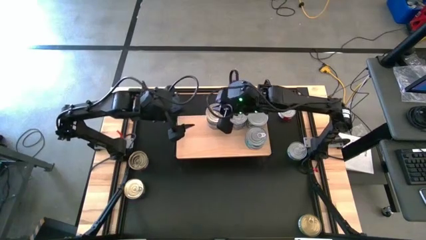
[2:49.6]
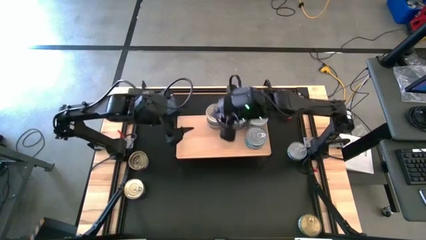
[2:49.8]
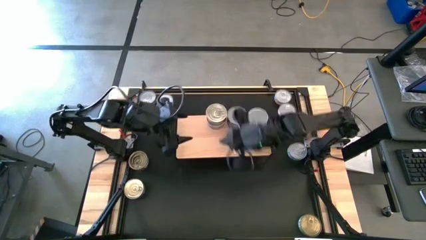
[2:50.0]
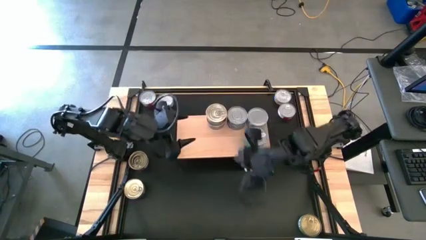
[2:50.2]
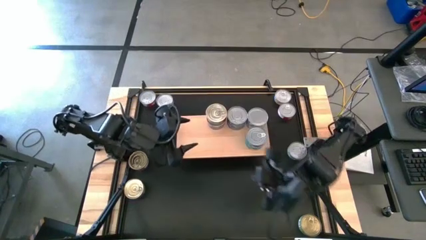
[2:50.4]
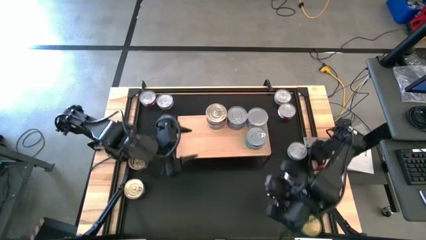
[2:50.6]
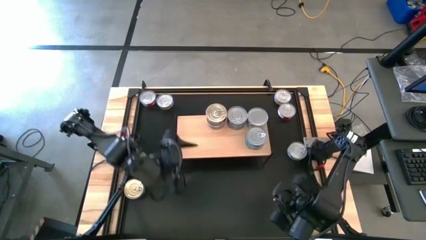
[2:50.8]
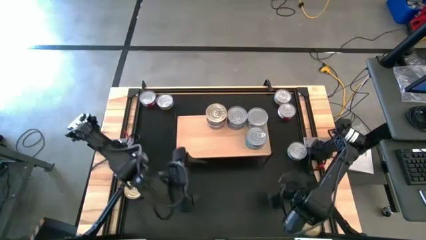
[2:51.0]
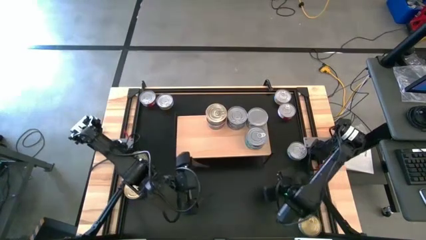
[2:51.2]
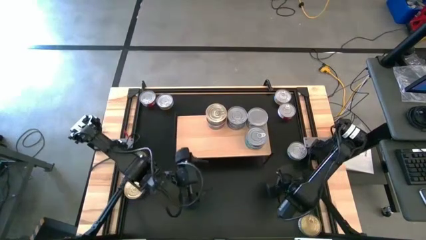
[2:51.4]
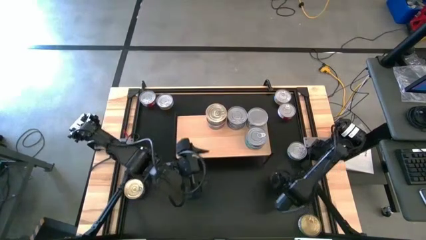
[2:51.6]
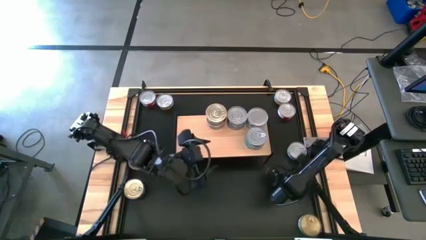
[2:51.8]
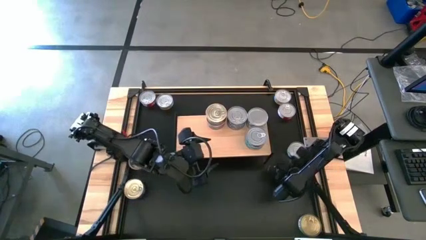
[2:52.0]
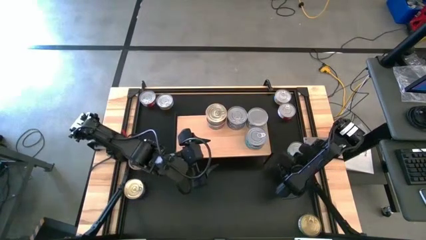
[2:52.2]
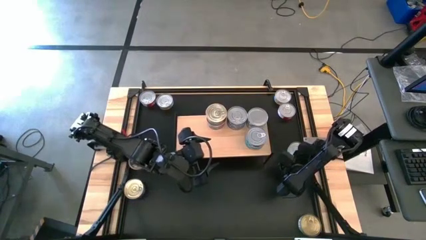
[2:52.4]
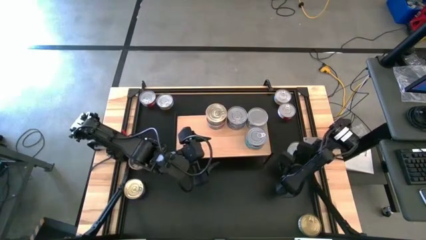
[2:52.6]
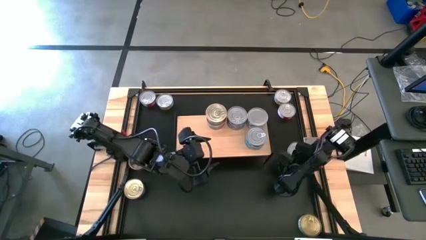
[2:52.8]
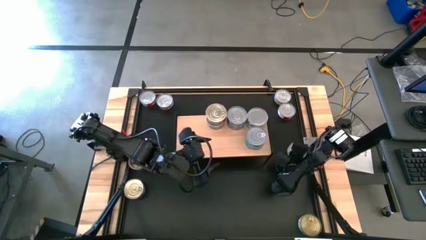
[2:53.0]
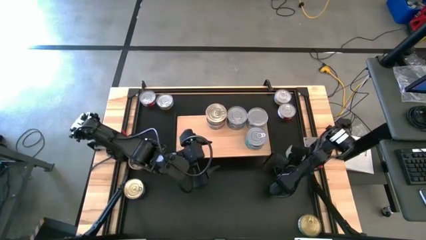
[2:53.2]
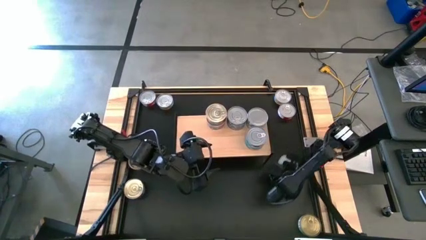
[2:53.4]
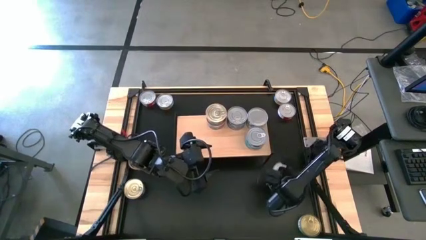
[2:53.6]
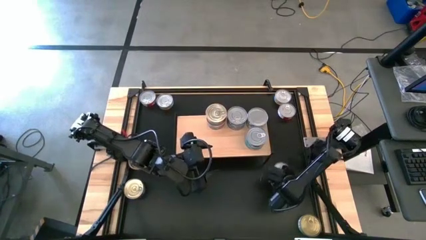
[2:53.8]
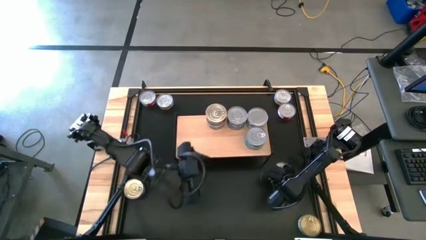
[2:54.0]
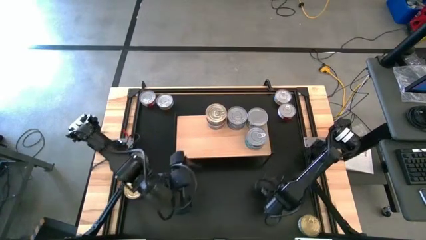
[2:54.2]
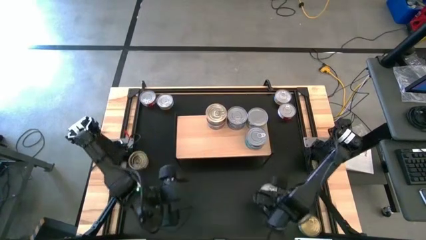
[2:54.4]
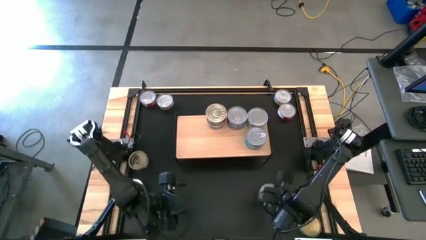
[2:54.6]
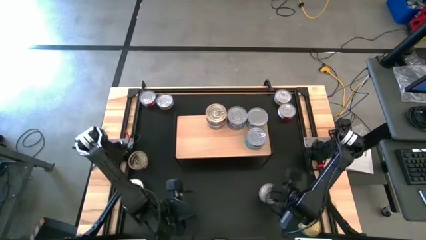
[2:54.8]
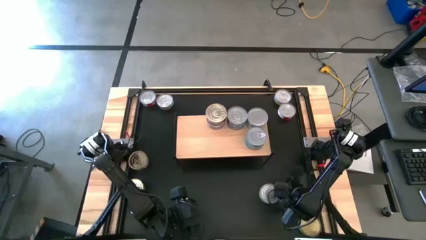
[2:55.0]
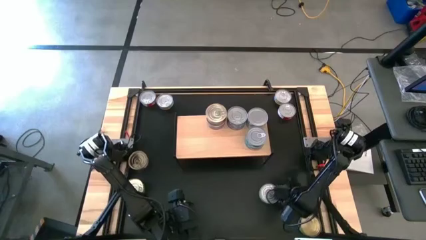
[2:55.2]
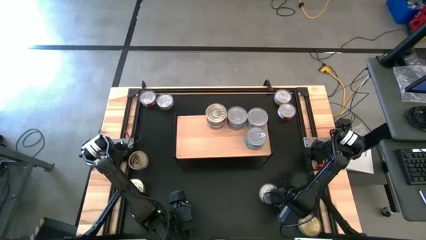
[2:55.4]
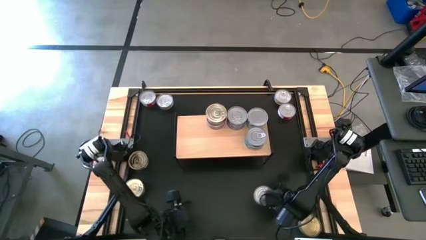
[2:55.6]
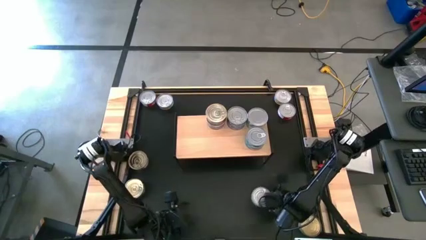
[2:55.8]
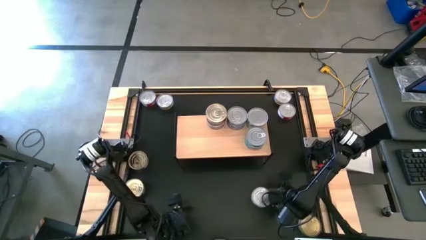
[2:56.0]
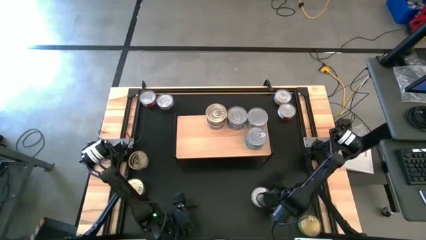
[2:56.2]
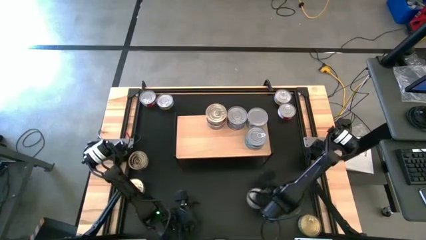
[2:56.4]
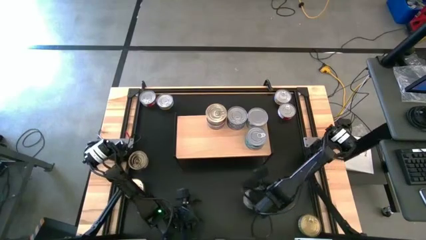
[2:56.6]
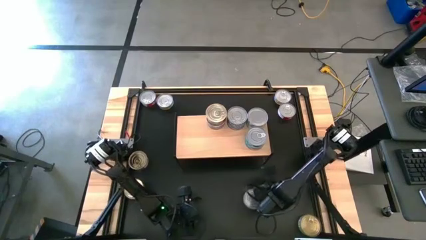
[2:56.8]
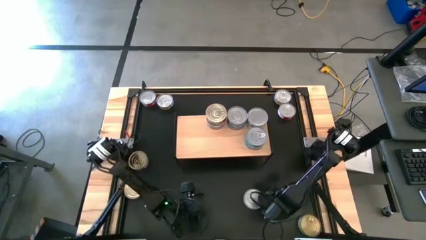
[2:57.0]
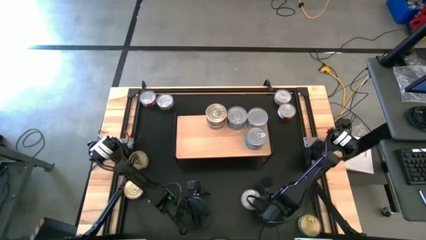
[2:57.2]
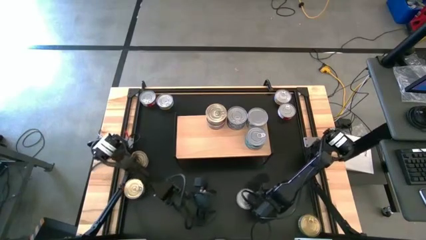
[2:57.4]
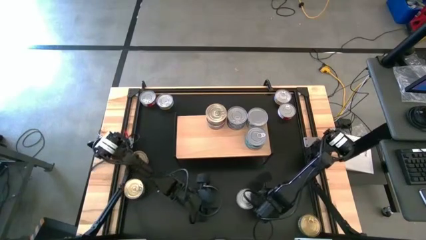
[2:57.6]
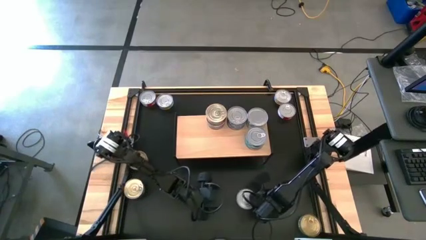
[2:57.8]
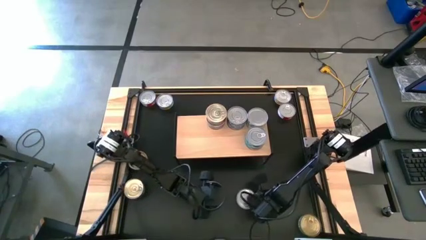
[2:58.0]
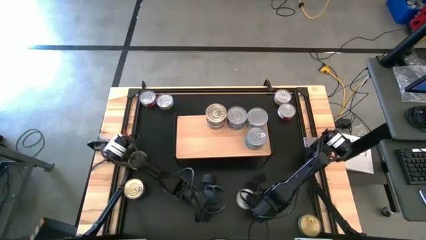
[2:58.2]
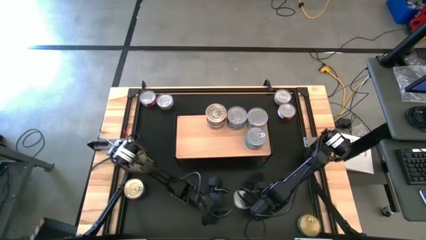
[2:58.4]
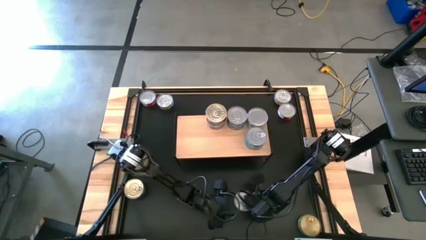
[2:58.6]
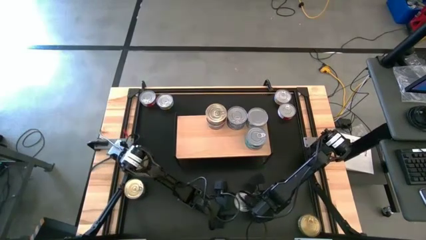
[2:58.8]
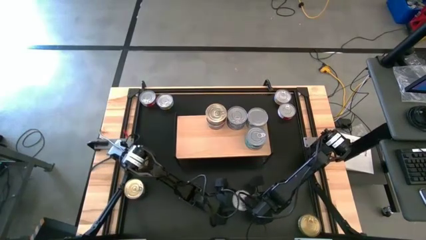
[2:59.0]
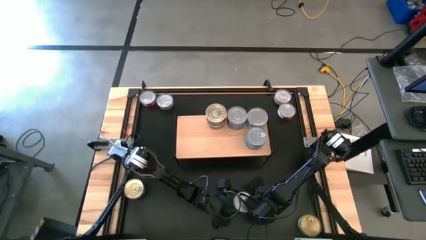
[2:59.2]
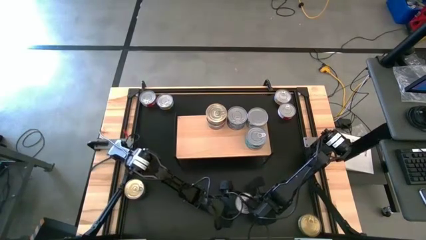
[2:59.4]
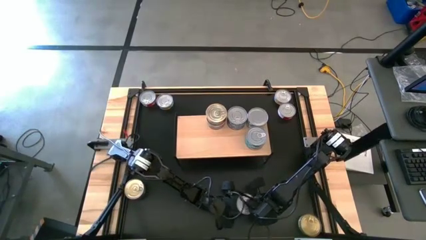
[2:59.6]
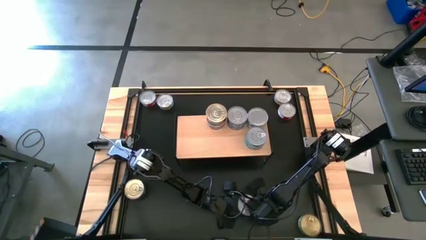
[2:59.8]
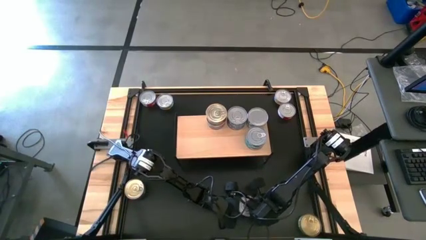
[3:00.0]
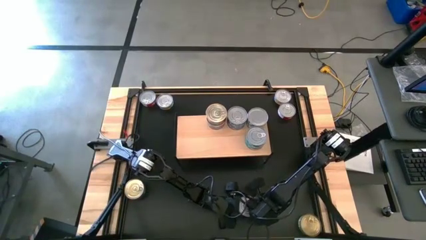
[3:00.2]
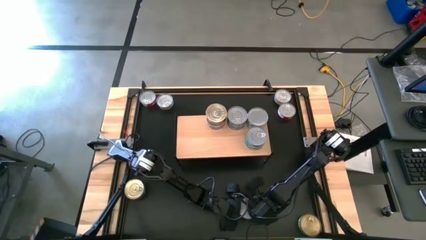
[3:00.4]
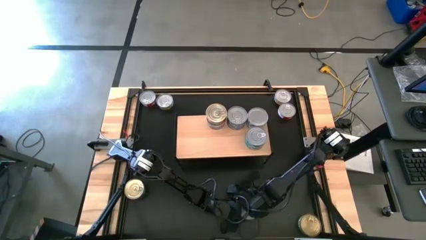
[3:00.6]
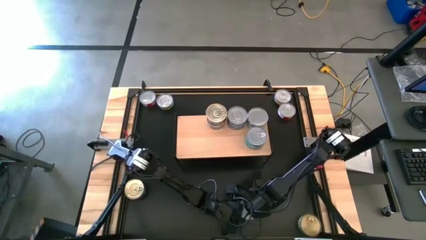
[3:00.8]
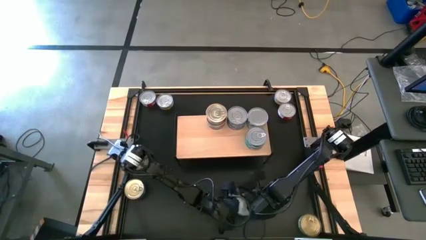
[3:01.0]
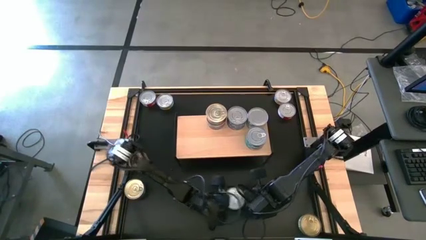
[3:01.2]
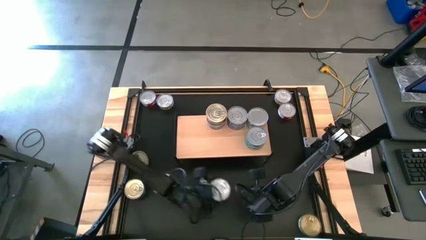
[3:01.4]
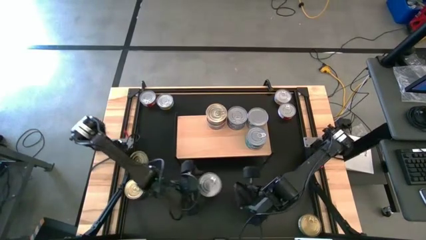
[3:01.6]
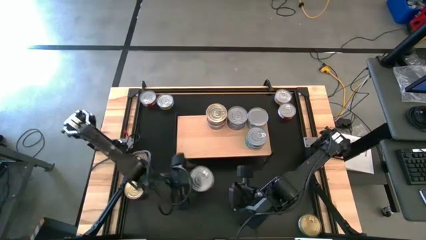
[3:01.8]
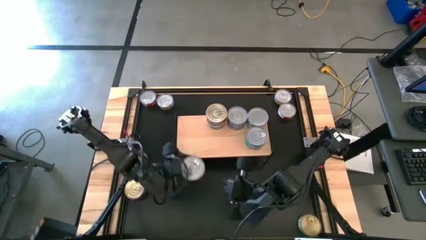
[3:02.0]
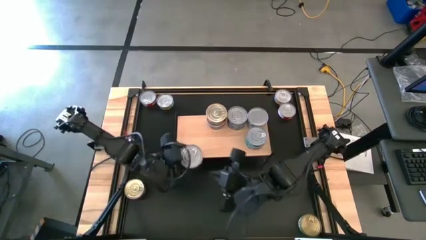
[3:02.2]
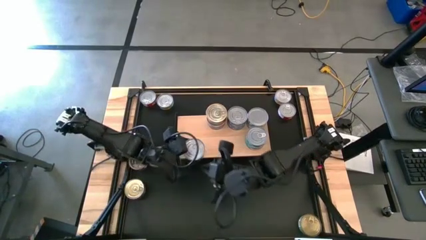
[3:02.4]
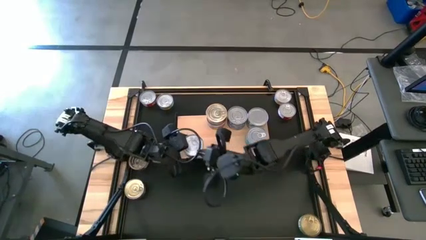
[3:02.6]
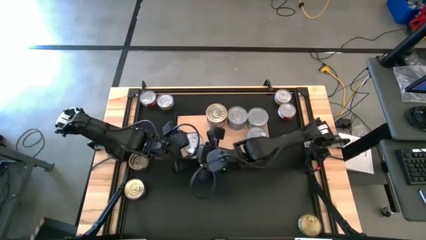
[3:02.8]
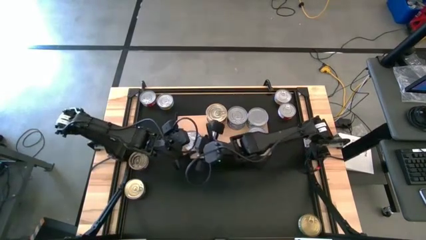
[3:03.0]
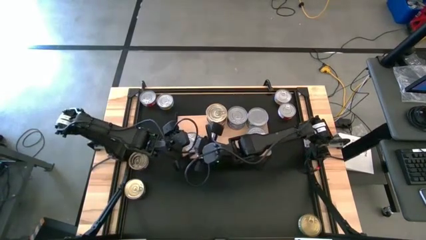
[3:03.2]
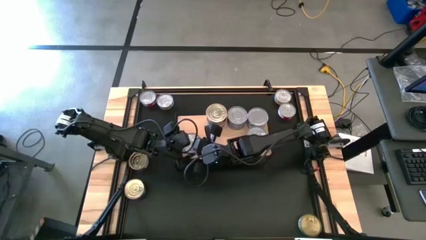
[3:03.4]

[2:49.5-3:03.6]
Task: Stack canned seafood by type on shelf
Put the green tuna can on the shelf

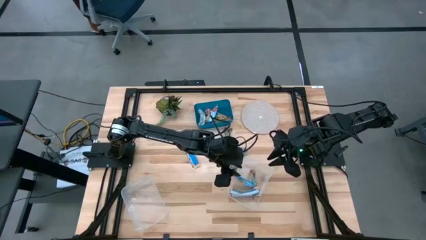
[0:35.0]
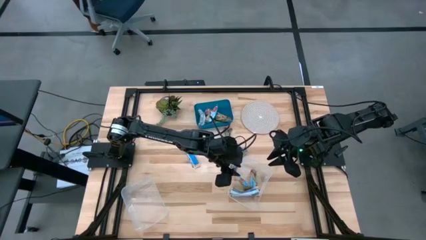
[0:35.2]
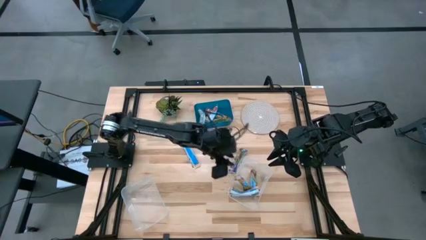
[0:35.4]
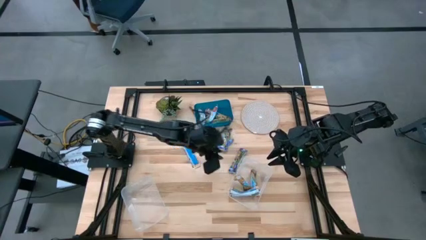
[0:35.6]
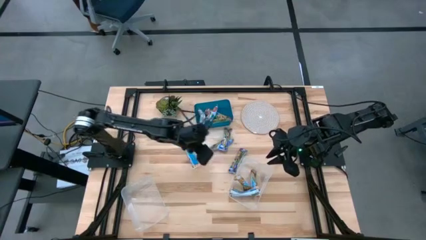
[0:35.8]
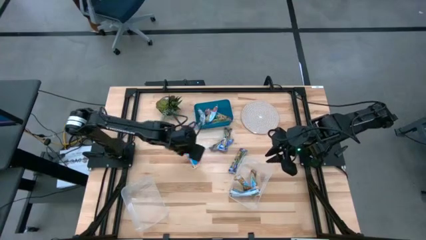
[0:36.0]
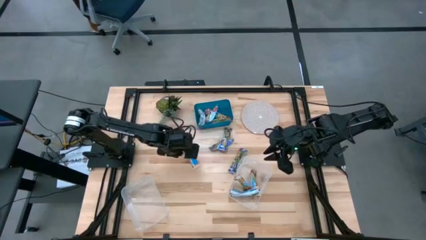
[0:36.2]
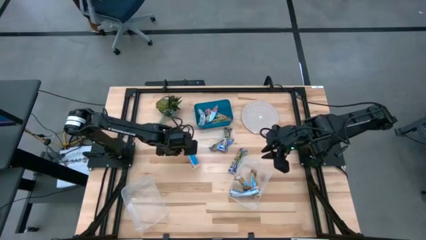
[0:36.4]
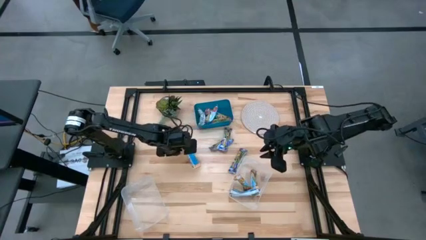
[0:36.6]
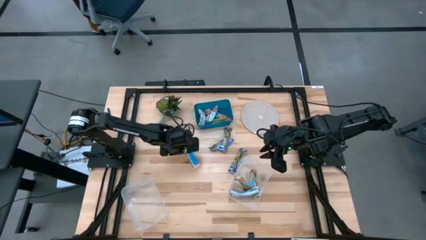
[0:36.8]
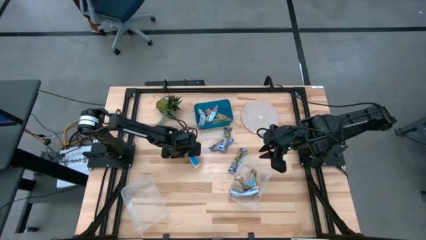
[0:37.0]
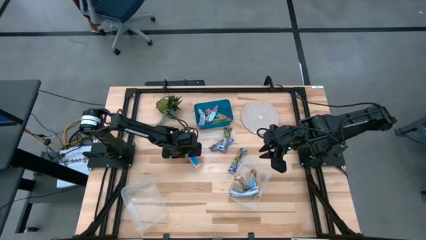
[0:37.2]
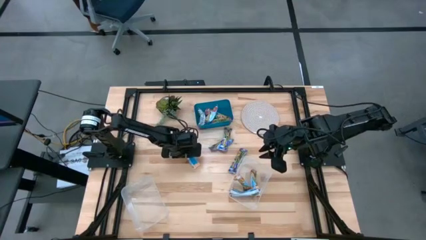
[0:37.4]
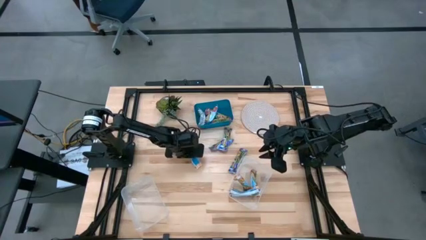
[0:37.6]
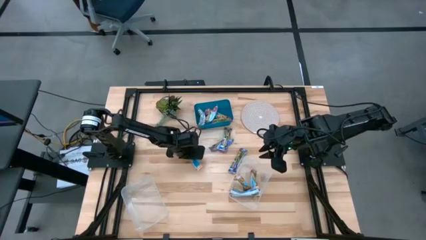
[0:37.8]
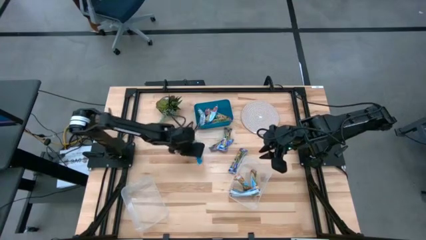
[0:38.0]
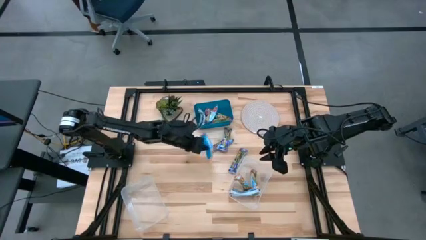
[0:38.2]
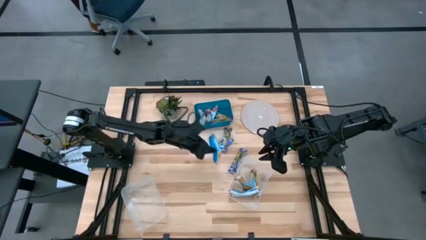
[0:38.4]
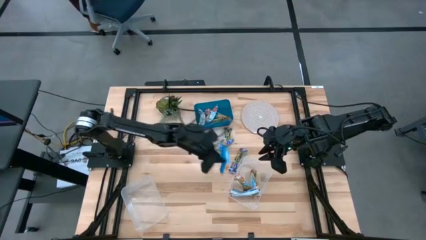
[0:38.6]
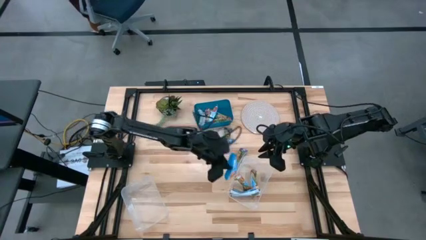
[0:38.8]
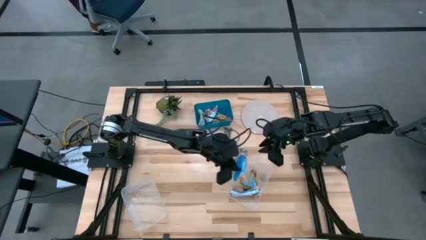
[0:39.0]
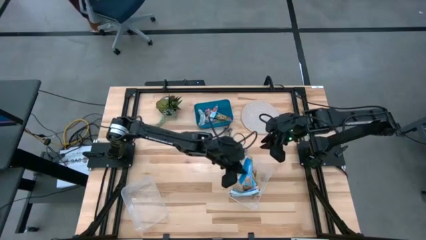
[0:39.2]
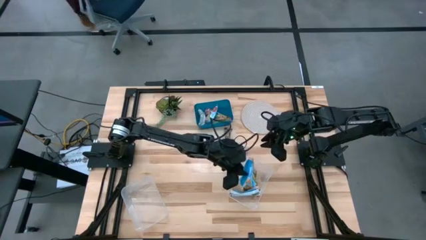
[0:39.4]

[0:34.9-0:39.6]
Task: Pick and place Granola Bars by type
Put the yellow granola bar into the right transparent bin
